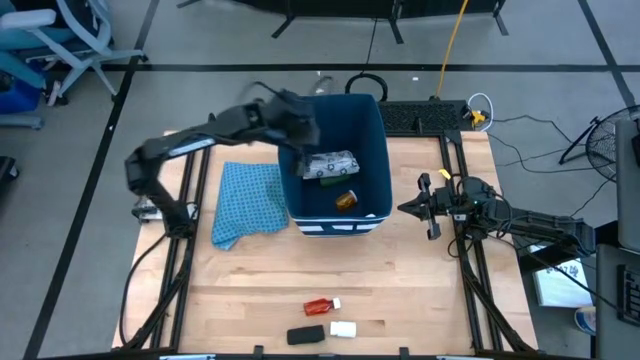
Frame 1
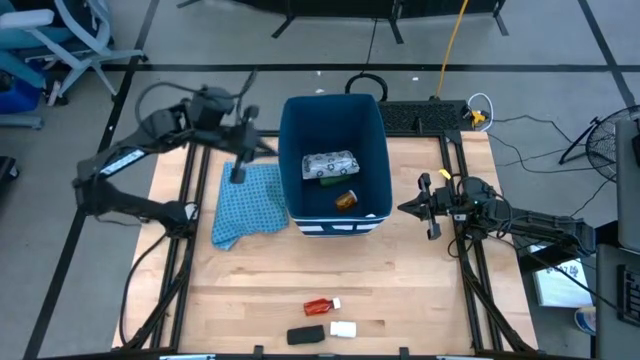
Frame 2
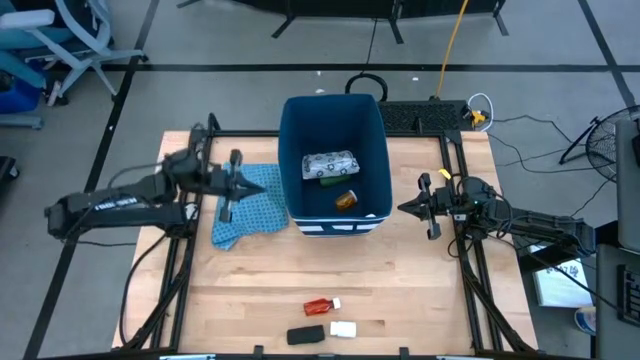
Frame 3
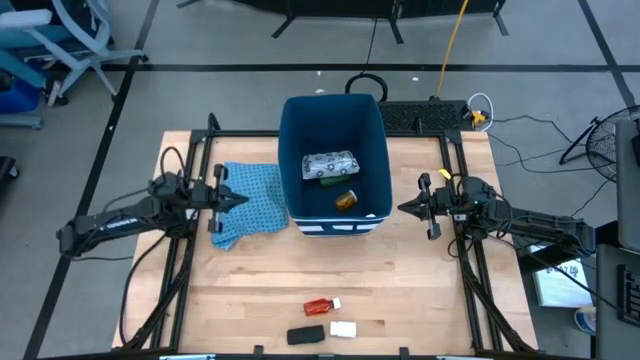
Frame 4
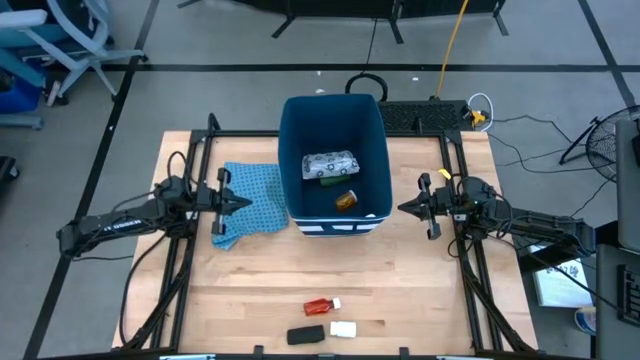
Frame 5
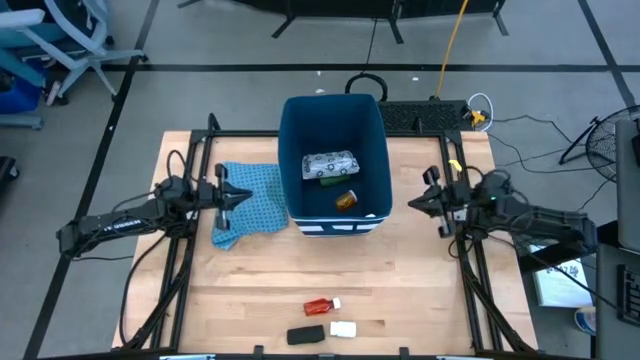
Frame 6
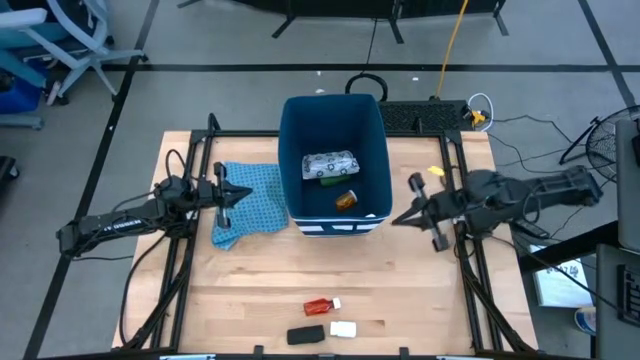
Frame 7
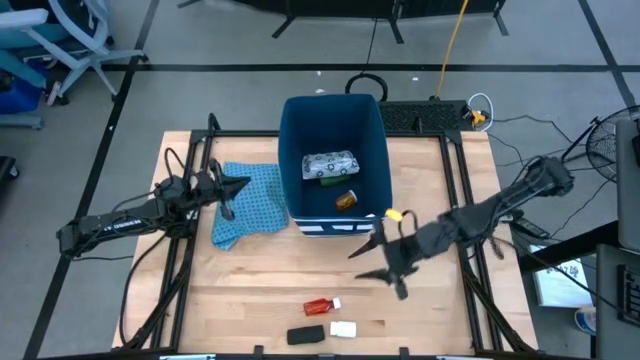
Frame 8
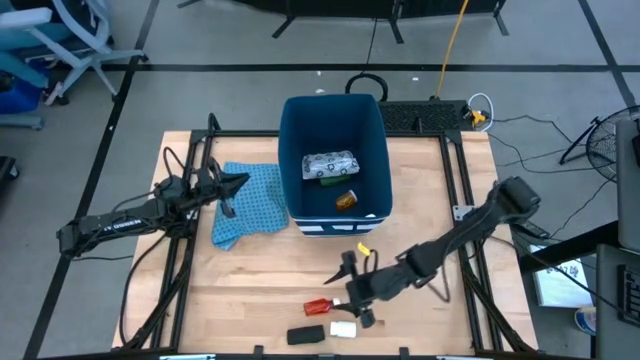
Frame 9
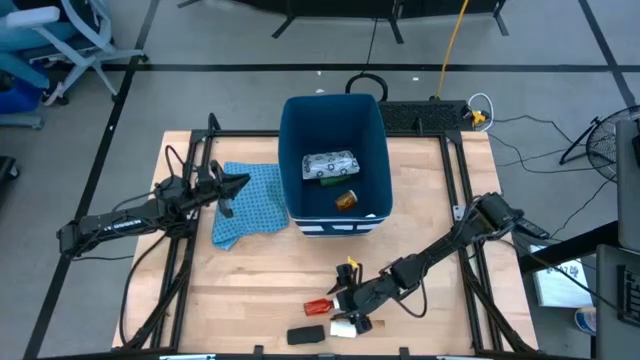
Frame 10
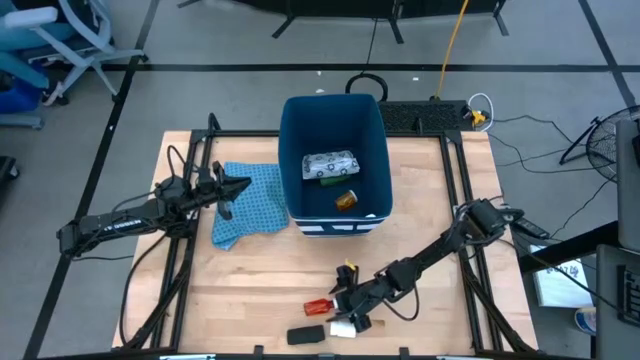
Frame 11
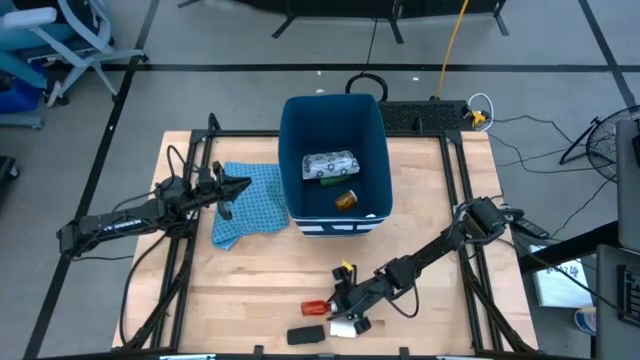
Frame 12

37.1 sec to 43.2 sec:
Task: Pick & place medical supplies in basket/bin
Put the red pill bottle into the blue bin

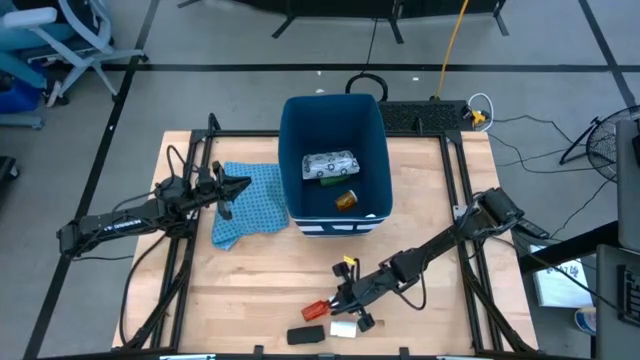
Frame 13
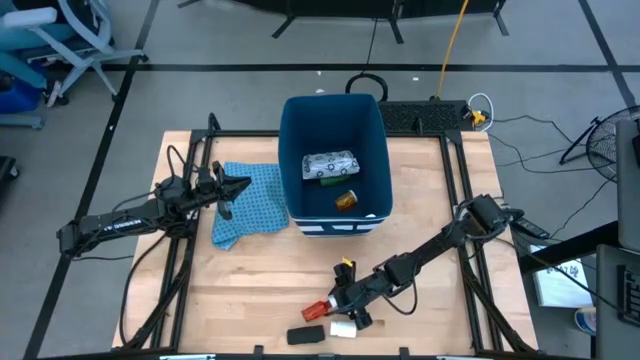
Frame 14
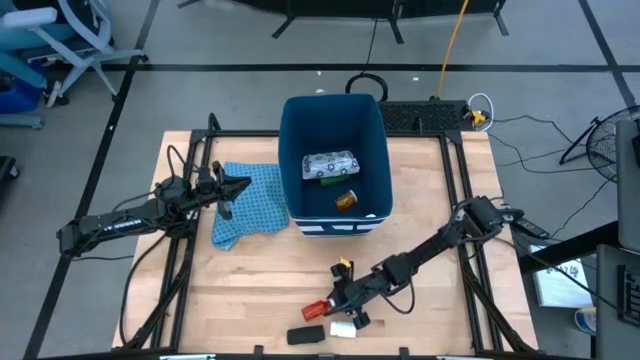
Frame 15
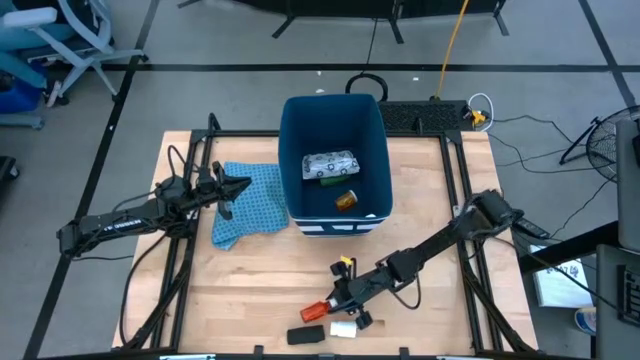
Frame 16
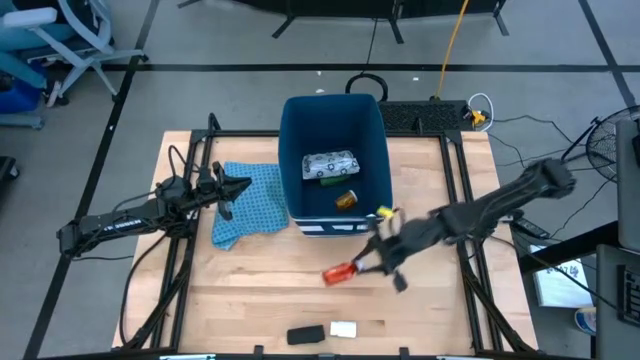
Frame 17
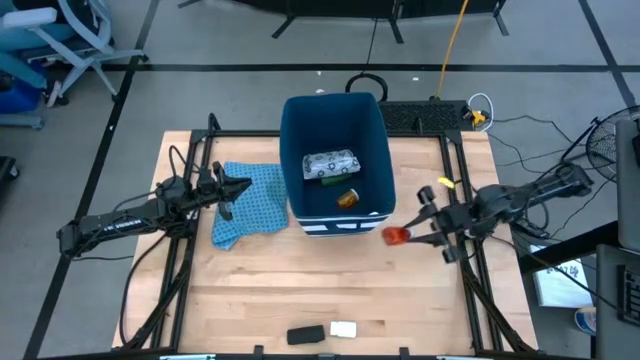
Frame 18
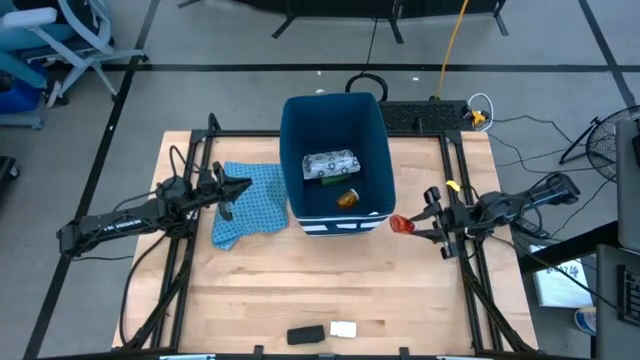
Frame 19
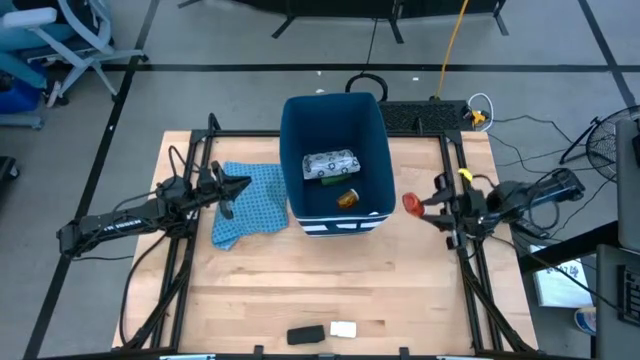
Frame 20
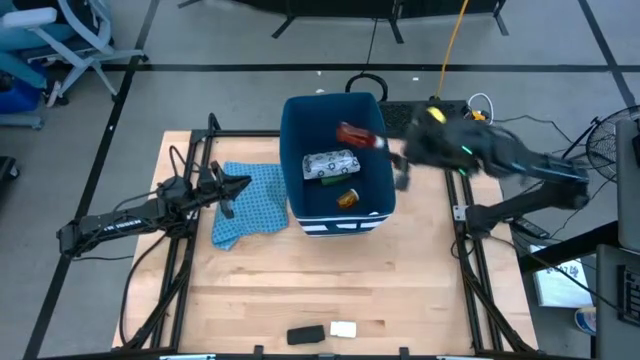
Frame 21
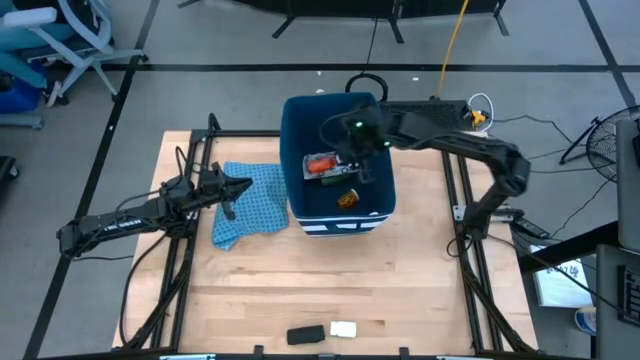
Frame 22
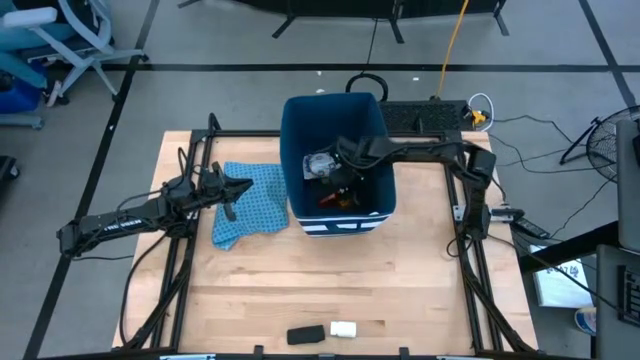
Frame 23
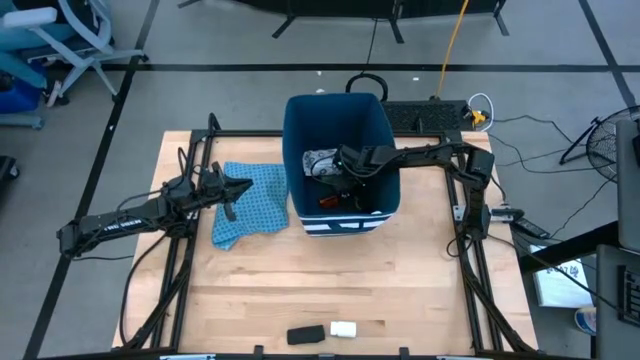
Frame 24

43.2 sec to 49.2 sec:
Put the red pill bottle into the blue bin

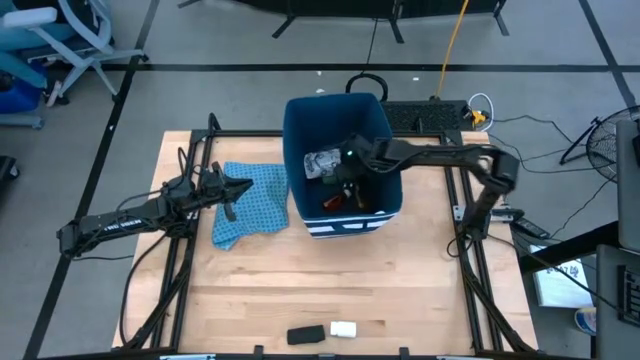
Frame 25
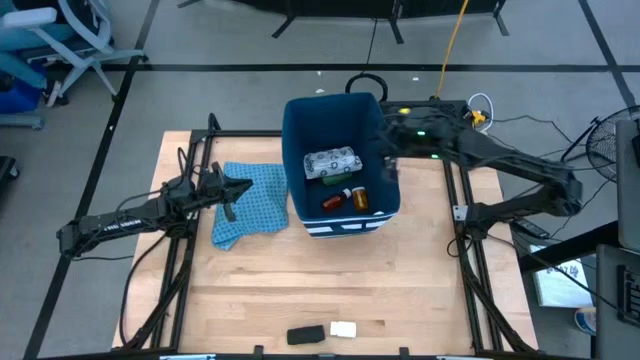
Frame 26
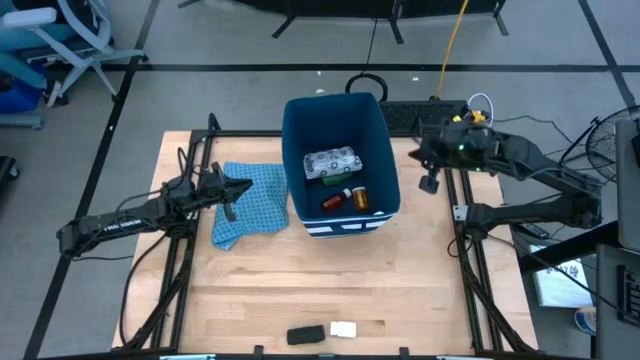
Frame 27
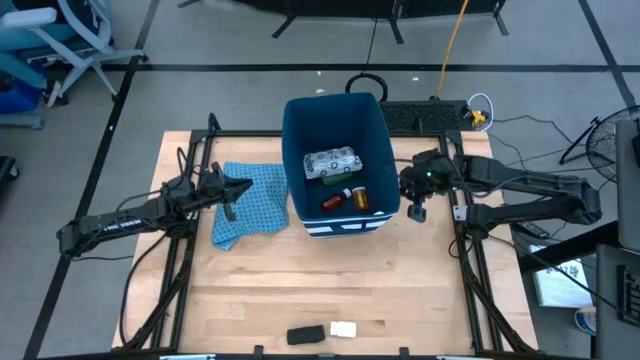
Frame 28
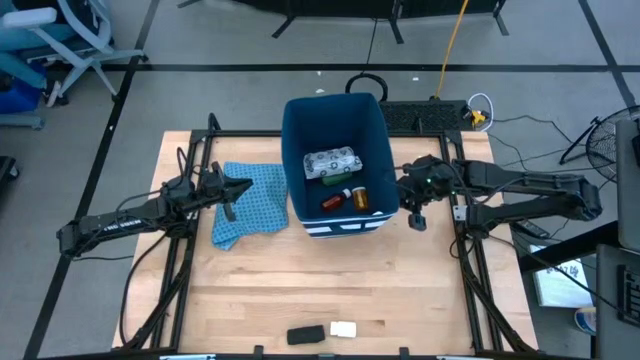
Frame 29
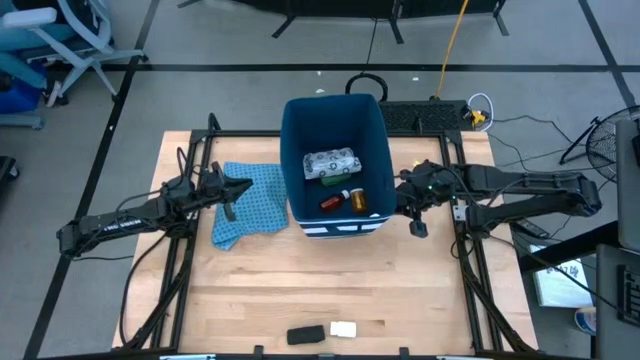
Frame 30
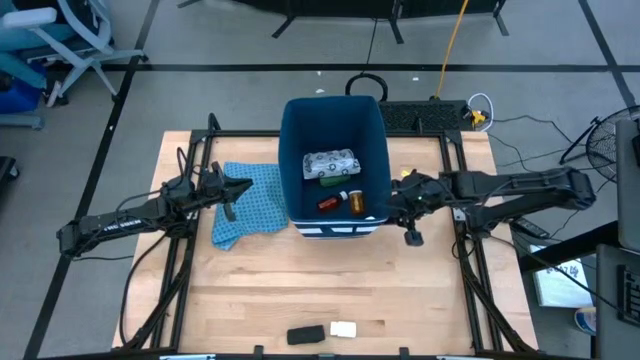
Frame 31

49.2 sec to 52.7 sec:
Adjust the blue bin

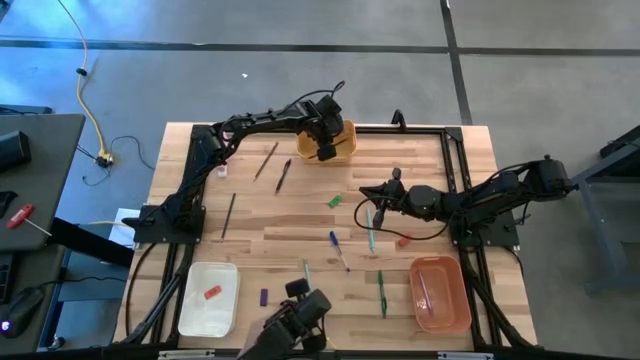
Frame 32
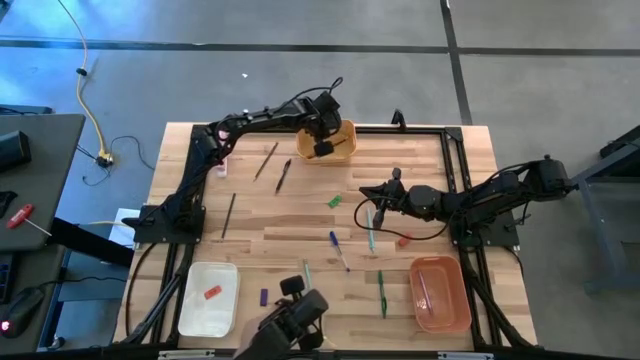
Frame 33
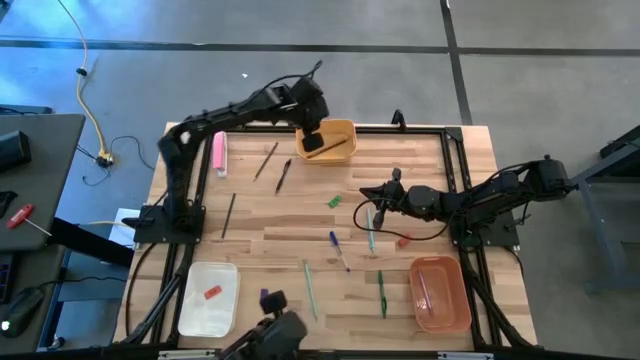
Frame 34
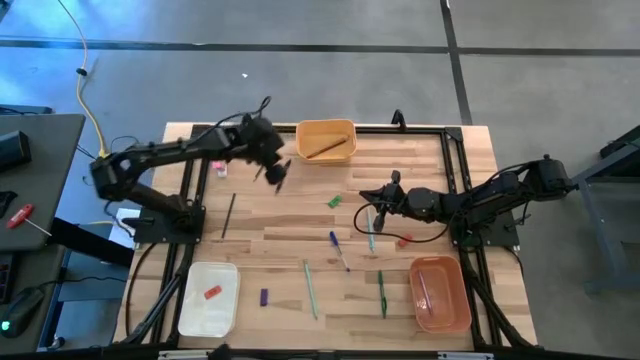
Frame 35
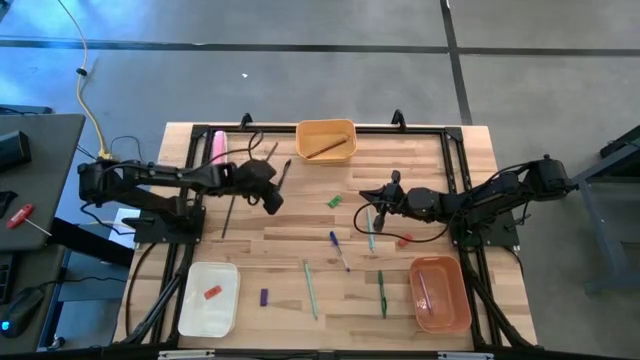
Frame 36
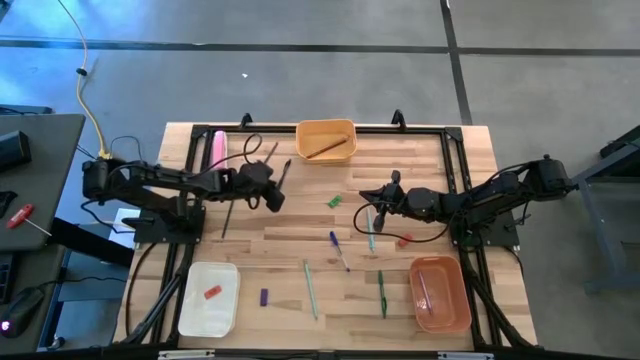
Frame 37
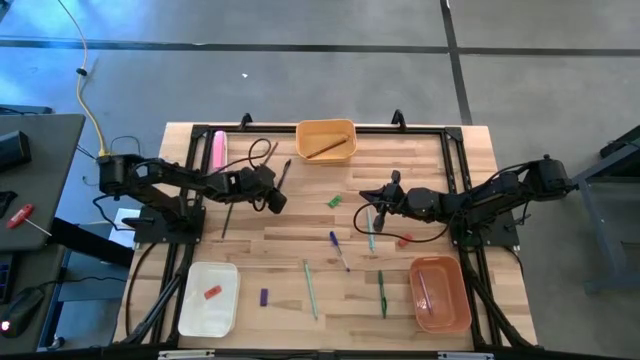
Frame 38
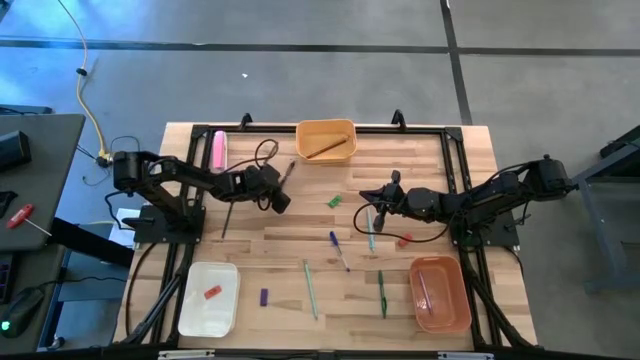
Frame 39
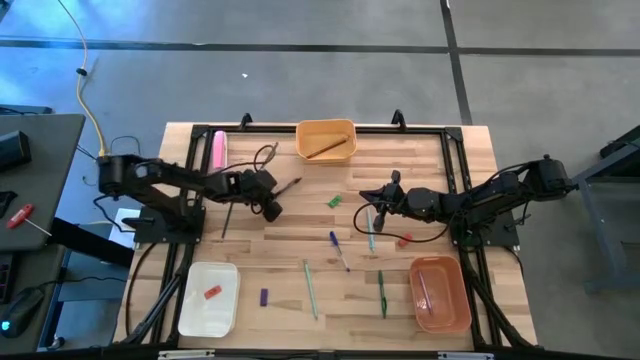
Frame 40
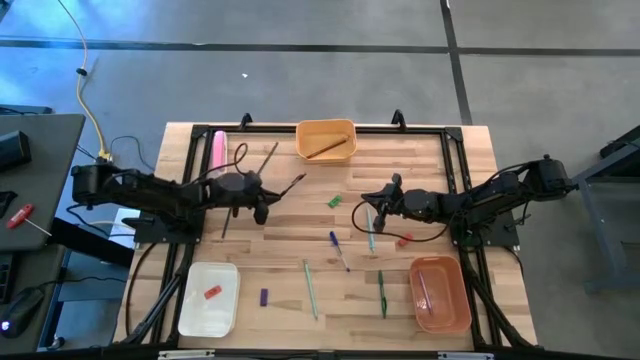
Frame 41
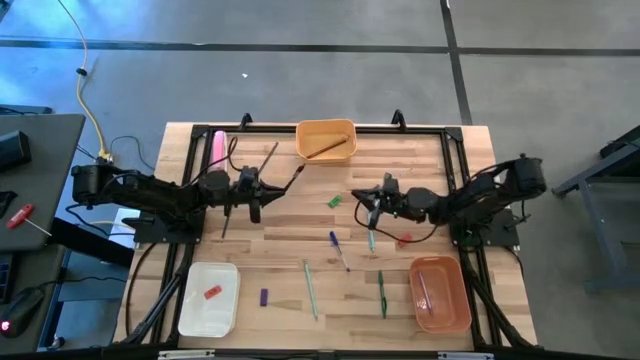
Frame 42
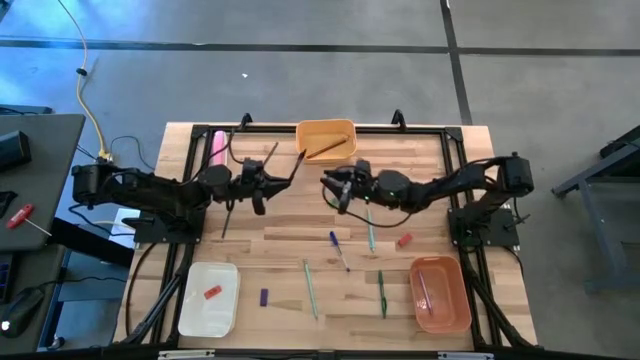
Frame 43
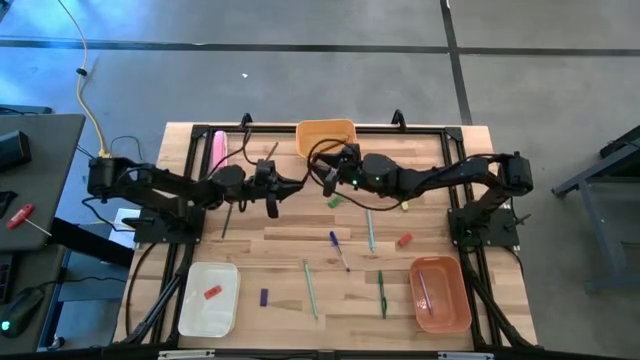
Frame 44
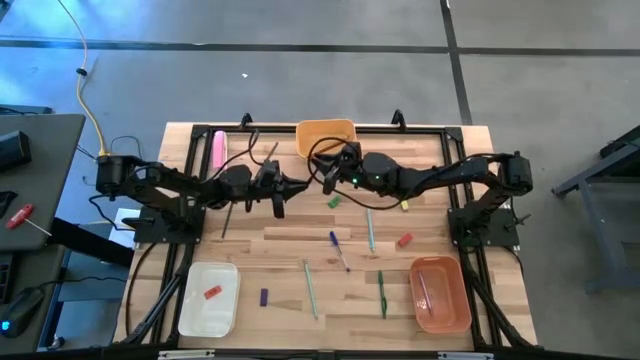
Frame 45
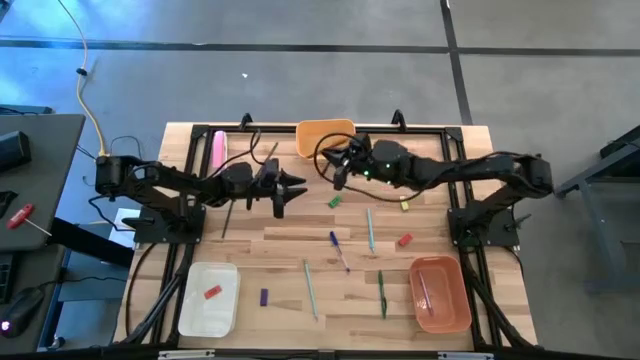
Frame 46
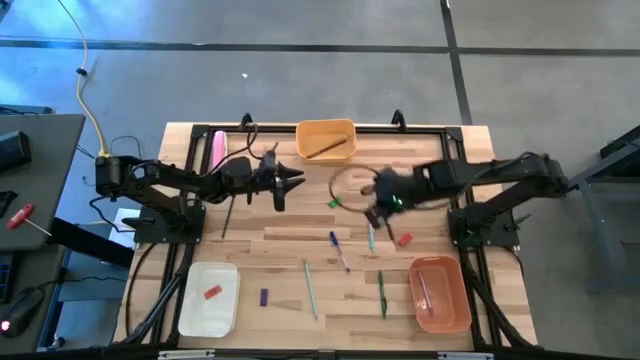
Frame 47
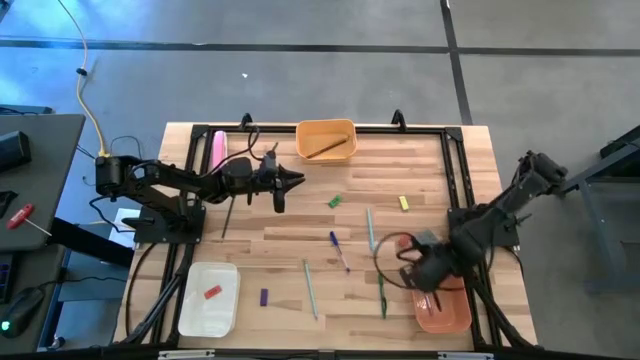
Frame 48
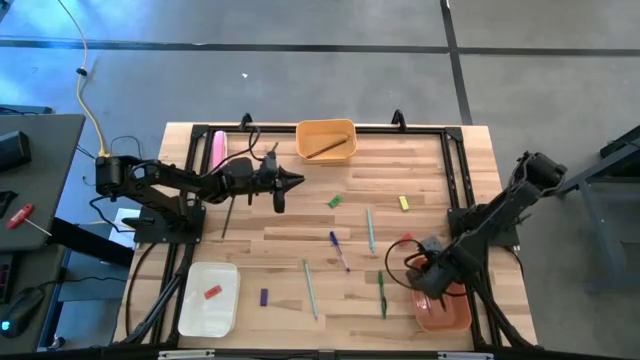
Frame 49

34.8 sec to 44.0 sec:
Task: Sort crayons/erasers/pens/pencils in bins
Put the black pen into the orange bin
